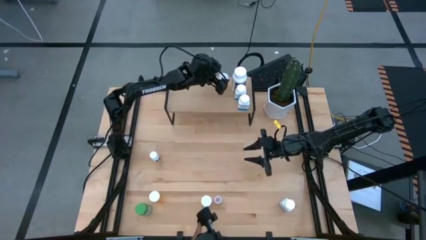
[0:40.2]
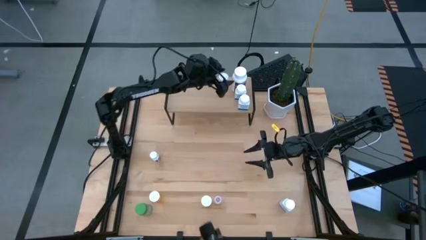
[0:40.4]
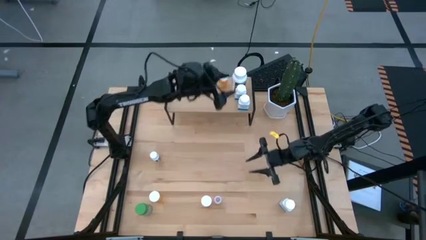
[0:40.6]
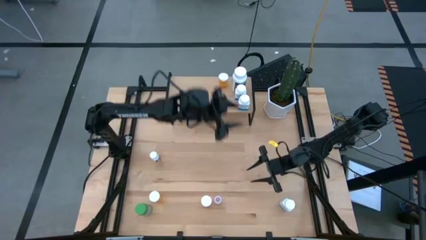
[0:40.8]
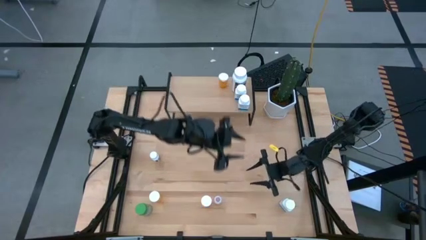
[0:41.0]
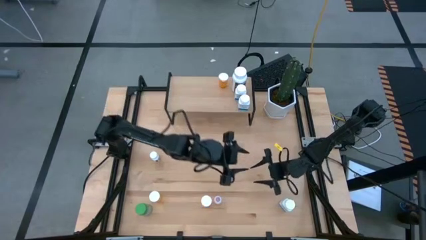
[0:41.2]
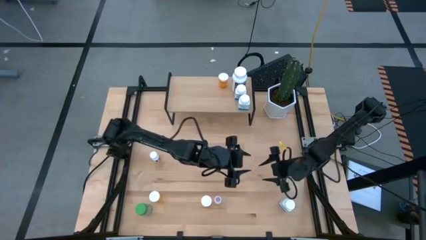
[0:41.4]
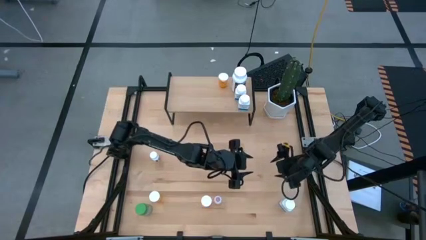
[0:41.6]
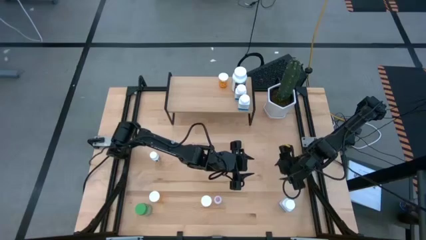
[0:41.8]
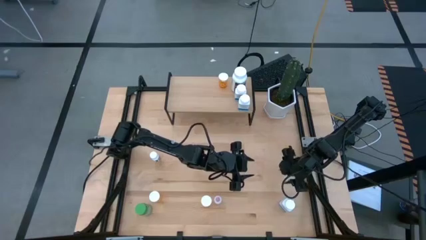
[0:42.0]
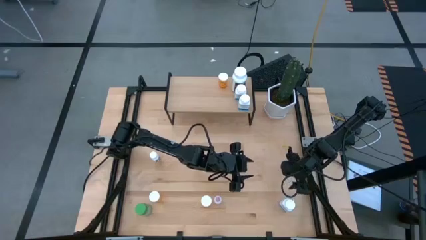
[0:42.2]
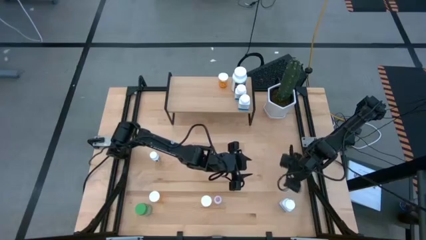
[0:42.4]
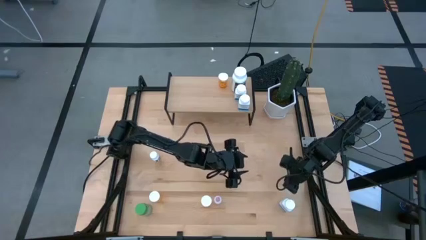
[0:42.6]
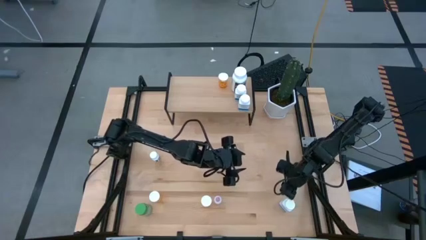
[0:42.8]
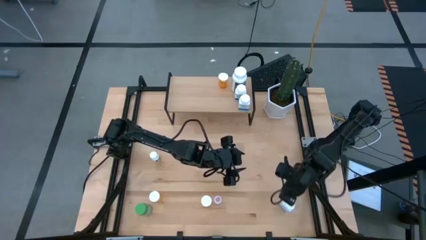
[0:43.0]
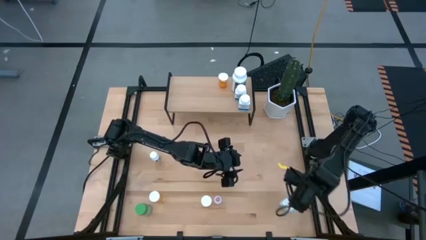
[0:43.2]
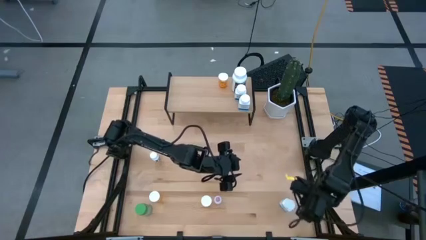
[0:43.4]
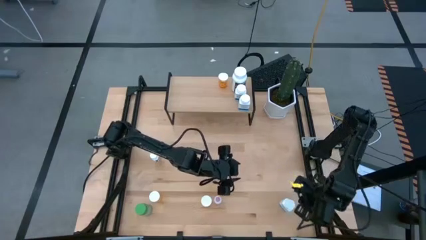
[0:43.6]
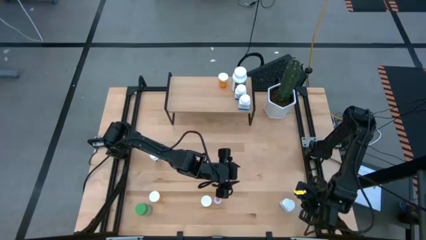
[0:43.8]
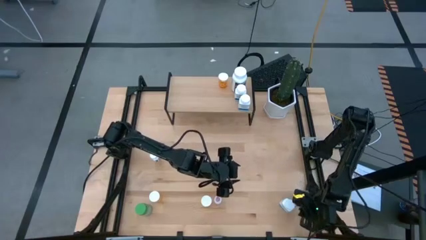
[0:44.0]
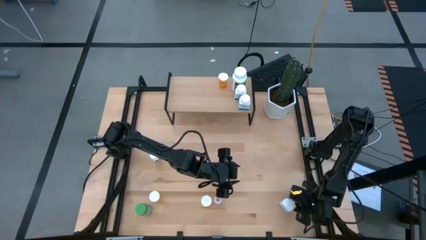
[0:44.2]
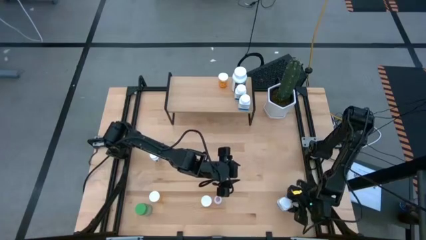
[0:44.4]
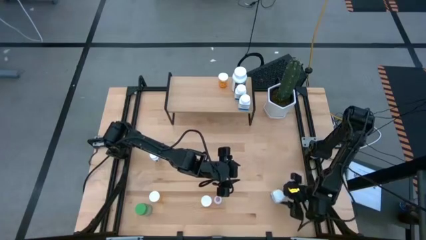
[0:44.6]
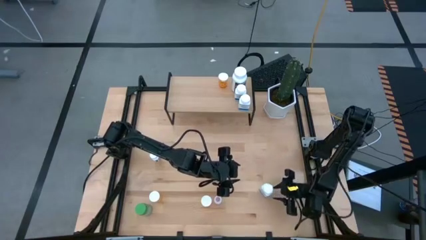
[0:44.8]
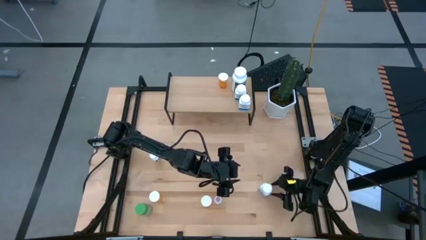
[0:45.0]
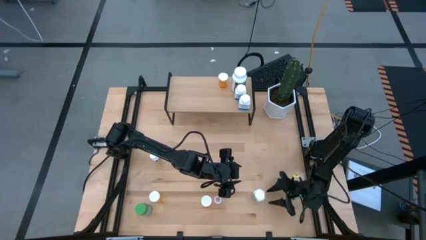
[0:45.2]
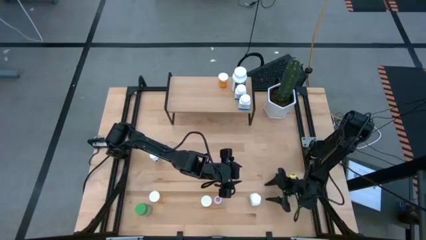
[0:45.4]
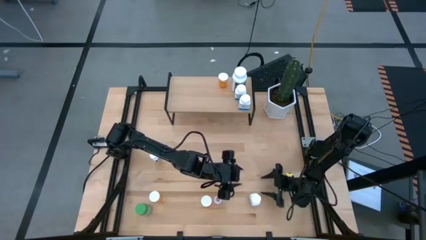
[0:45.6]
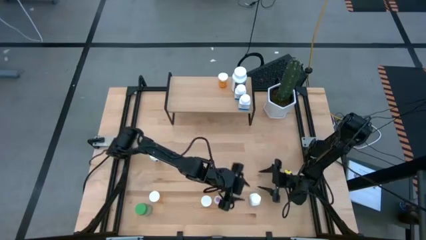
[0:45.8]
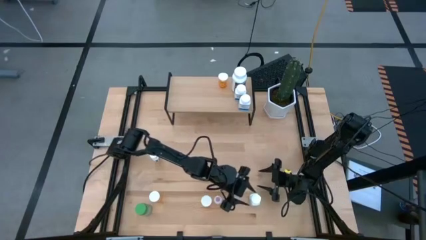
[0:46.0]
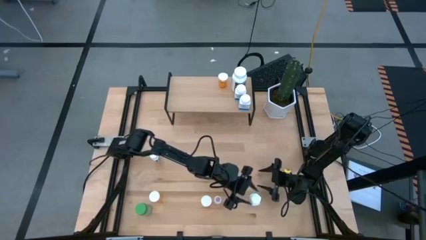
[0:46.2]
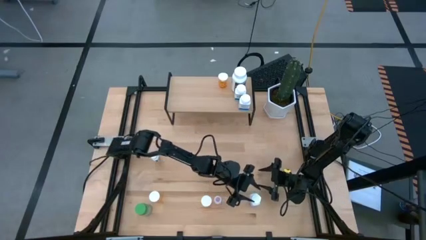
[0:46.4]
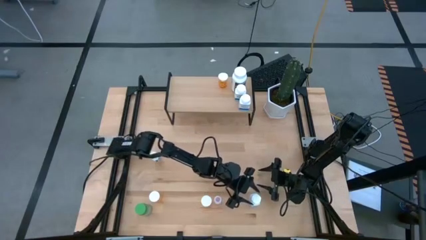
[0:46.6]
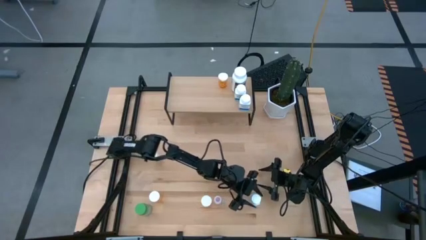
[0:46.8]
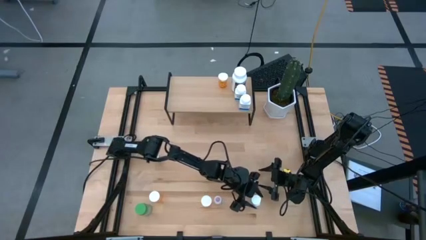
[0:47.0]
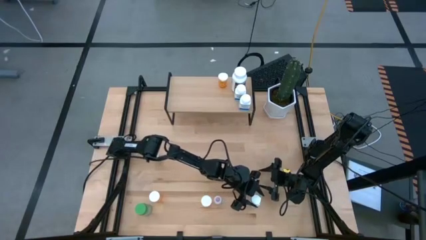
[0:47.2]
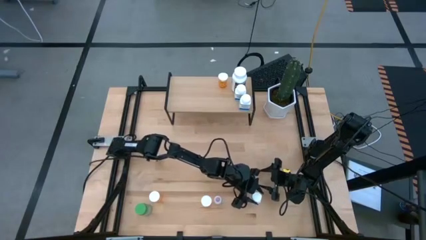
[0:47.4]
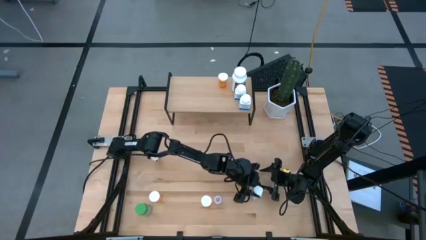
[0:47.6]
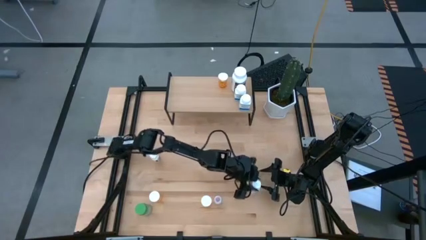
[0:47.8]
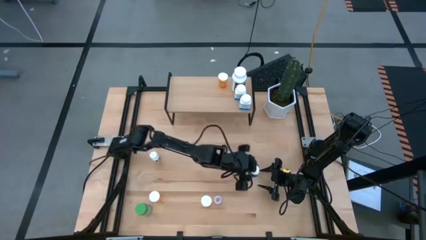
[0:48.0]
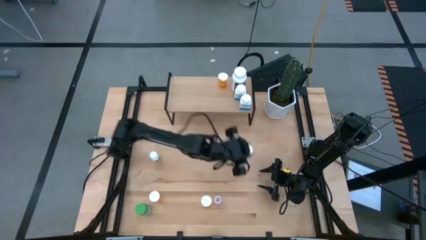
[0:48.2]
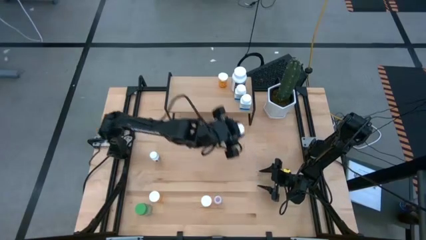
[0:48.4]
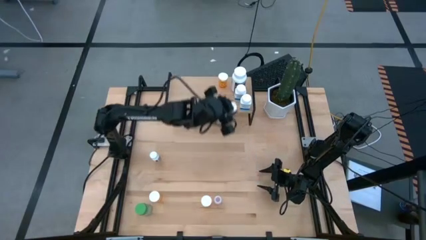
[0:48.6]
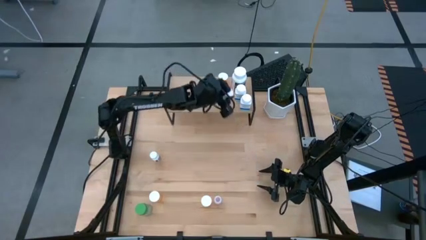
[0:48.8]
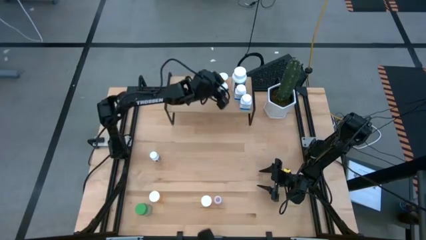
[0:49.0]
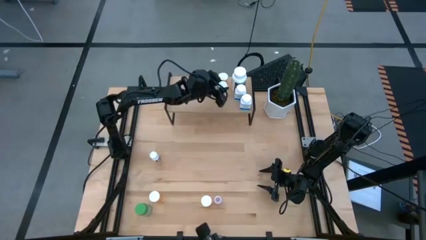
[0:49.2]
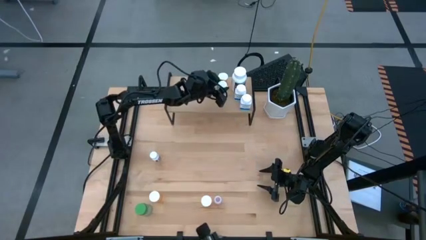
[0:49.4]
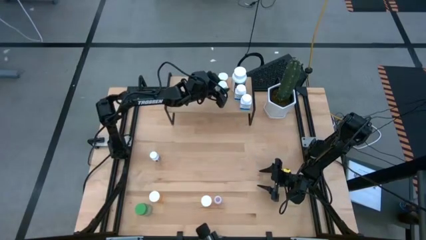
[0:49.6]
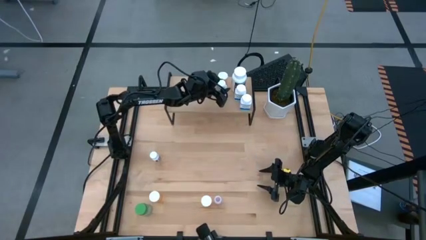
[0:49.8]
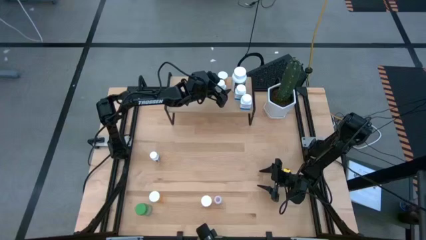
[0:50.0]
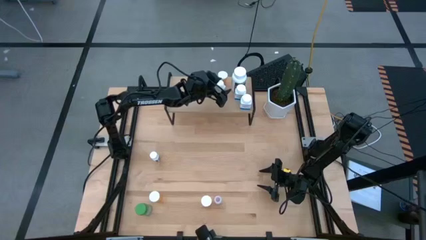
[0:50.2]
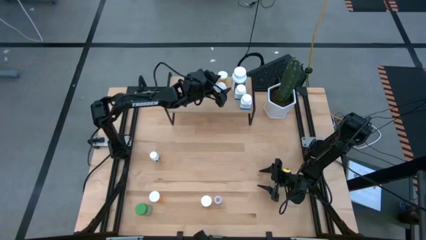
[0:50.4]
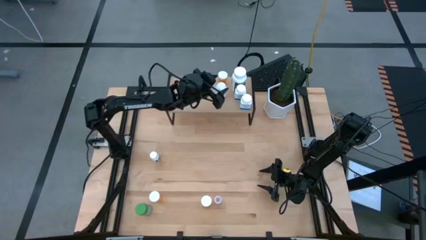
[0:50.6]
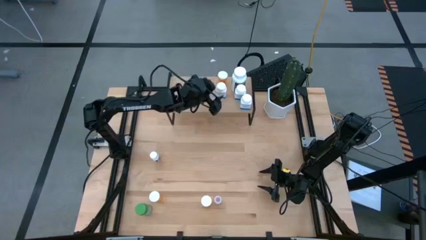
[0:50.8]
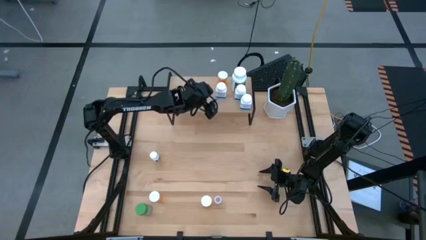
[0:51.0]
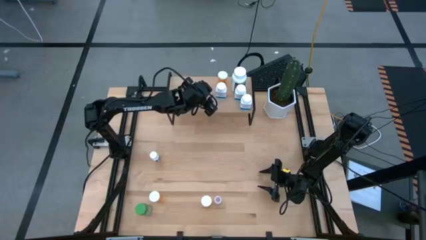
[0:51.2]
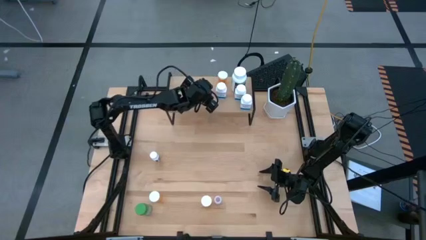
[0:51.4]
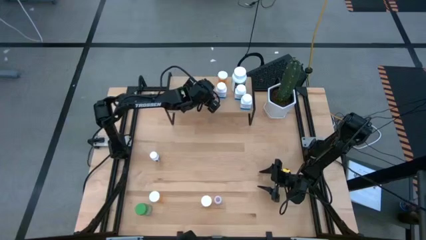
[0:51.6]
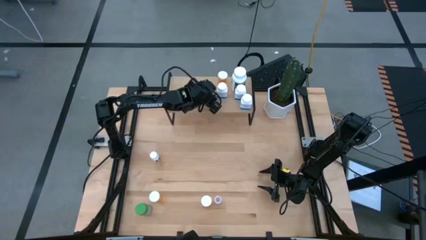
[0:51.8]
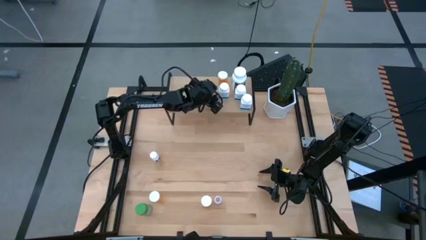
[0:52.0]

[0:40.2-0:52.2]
Task: Pick and place medicine bottles onto shelf by color
Put the white blue pill bottle on the shelf

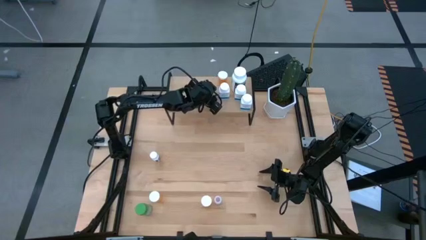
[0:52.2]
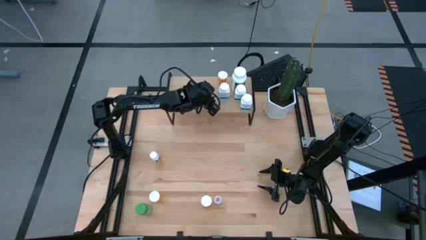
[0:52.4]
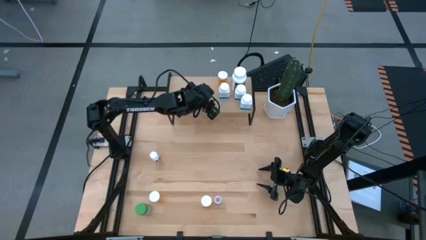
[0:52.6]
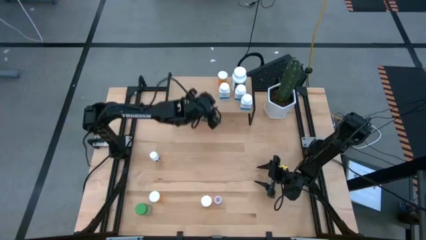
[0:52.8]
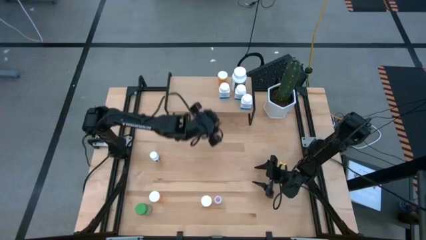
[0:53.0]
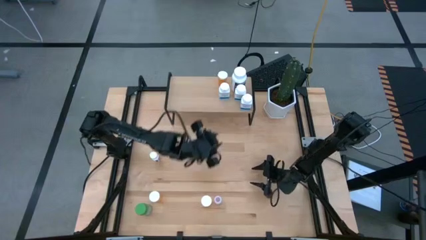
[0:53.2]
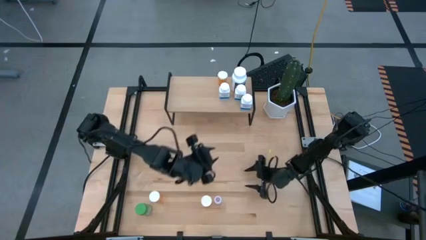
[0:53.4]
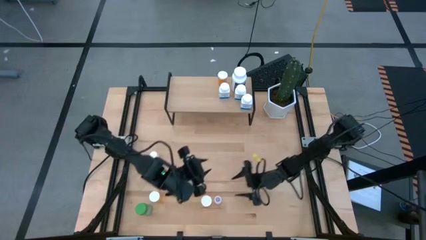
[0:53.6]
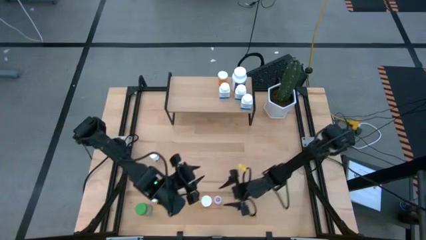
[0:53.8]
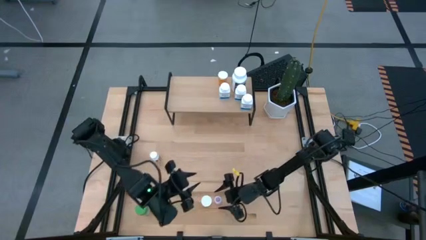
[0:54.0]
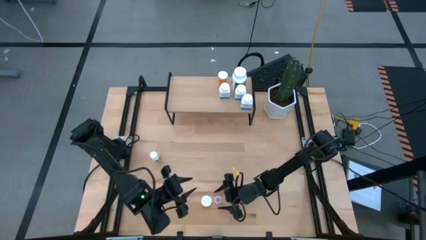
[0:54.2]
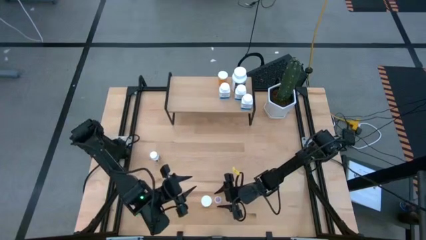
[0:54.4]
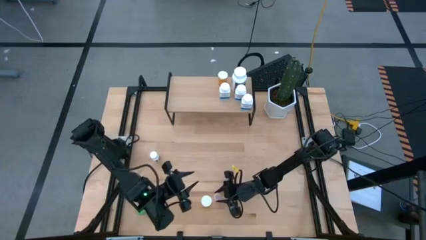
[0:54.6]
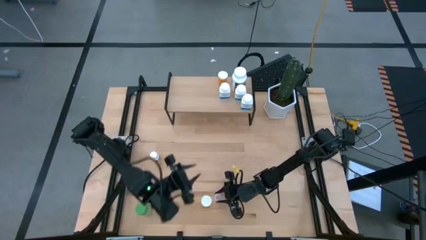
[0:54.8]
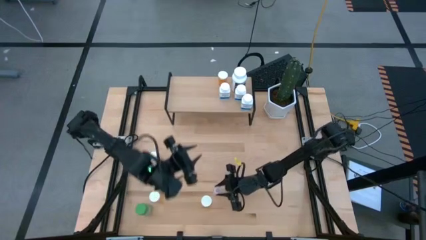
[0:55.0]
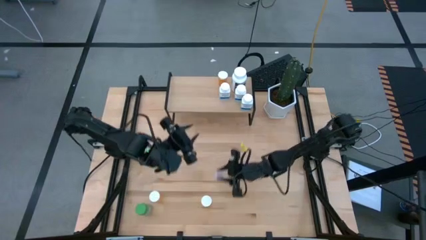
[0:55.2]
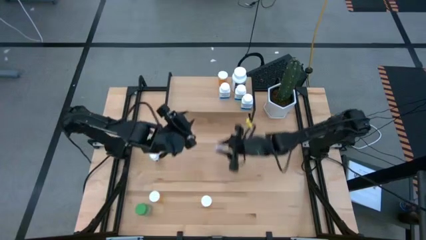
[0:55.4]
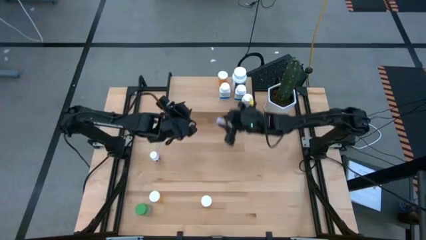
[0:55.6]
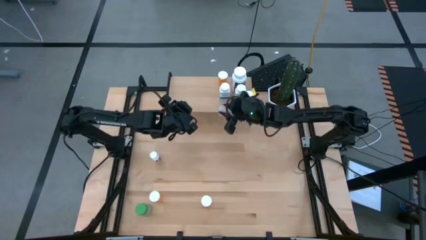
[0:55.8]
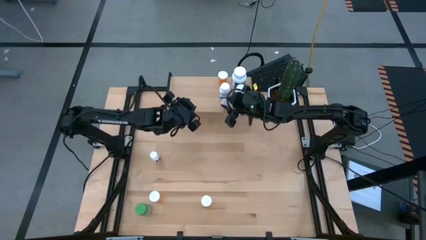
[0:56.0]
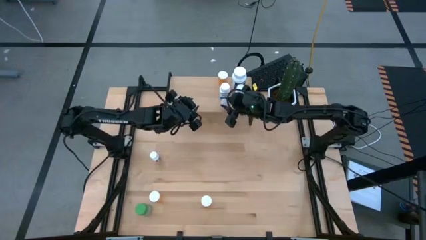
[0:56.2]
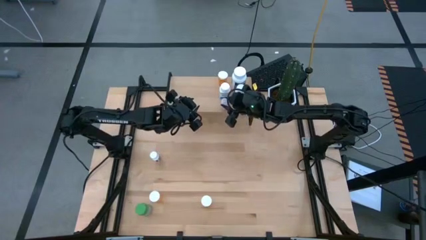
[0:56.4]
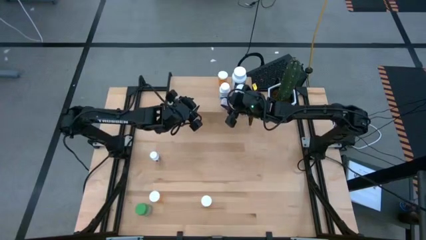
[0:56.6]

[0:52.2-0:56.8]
Put the transparent pill bottle on the shelf
